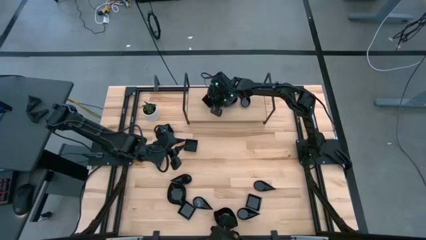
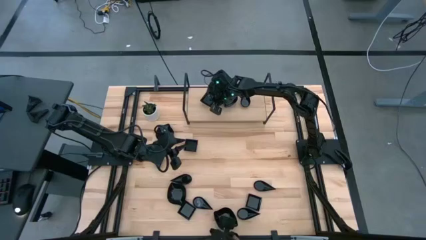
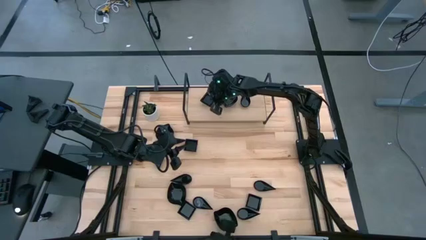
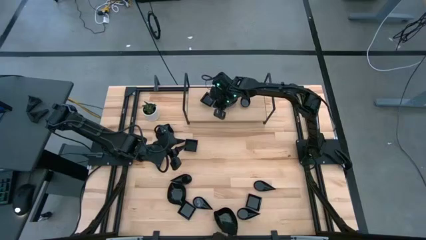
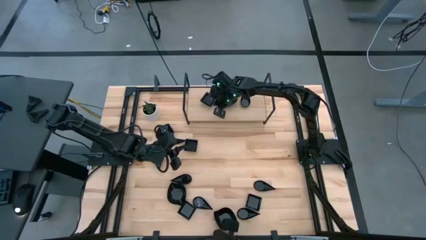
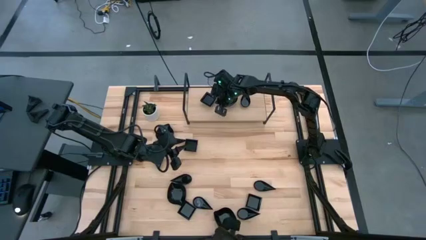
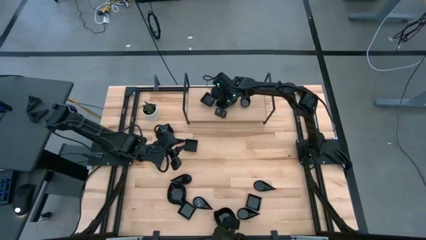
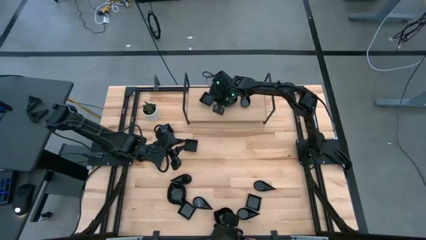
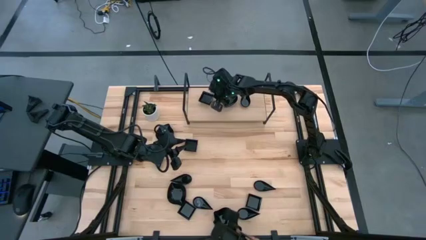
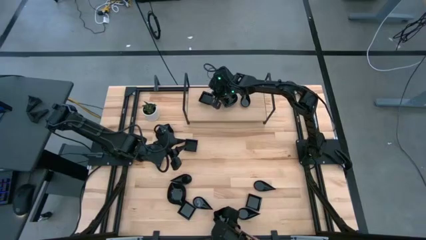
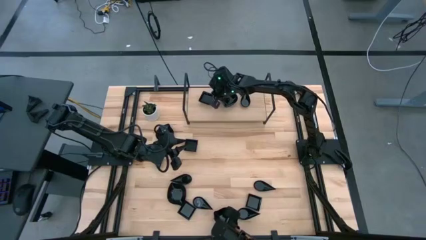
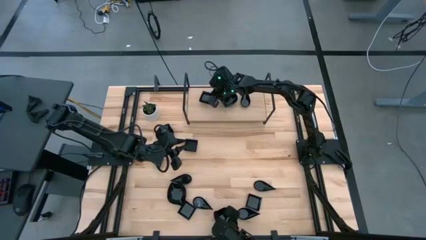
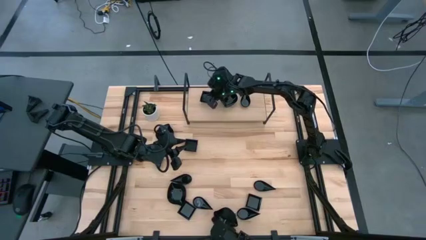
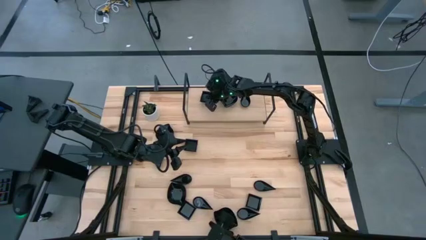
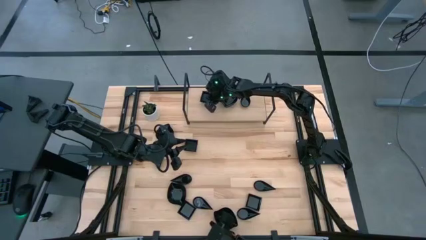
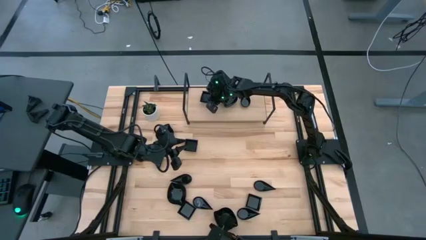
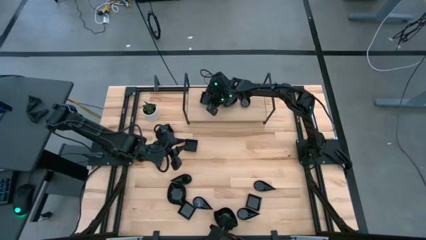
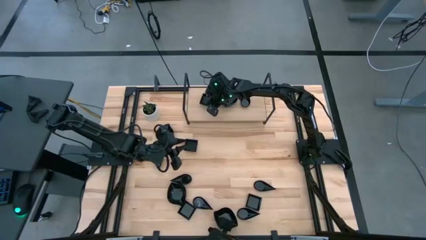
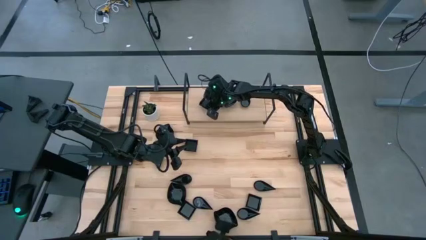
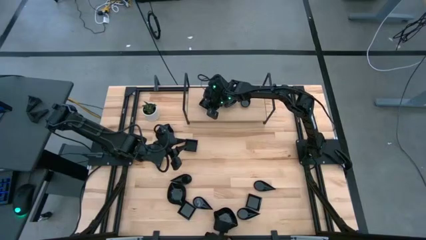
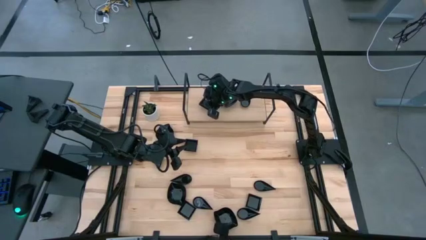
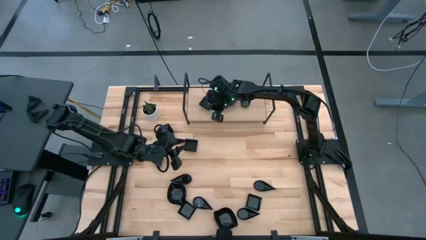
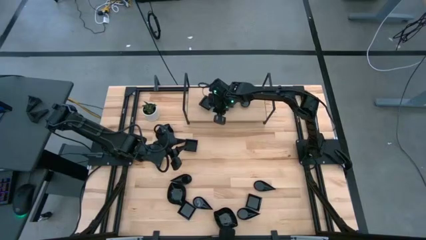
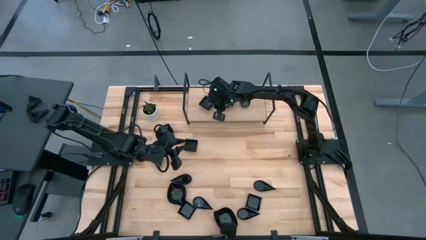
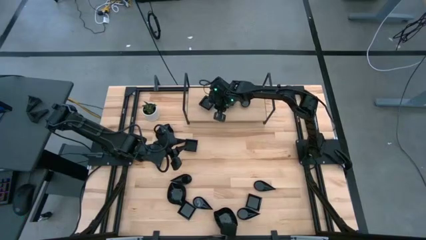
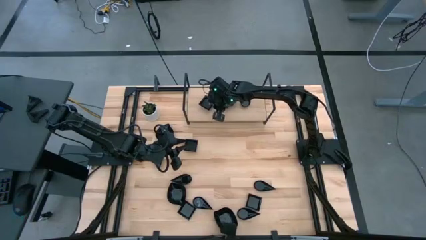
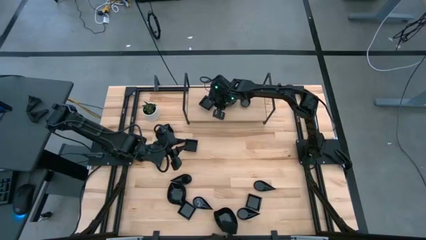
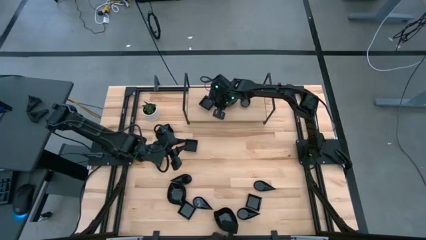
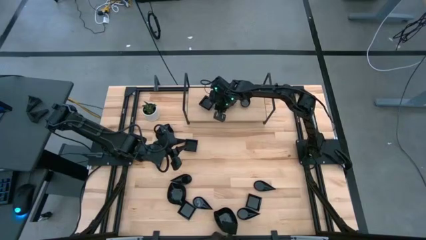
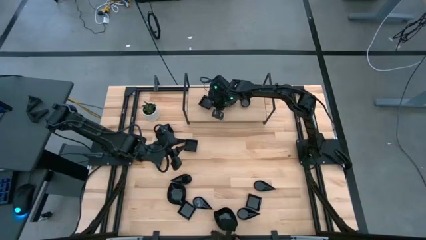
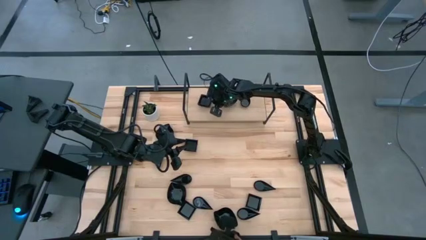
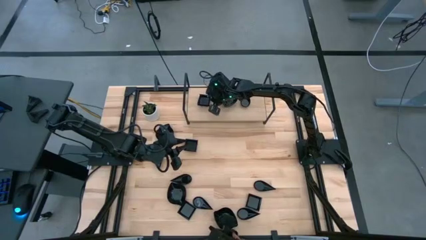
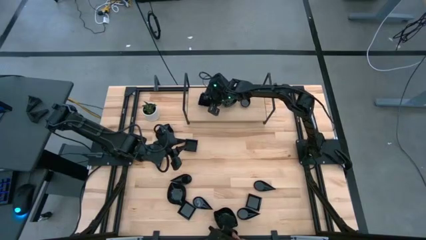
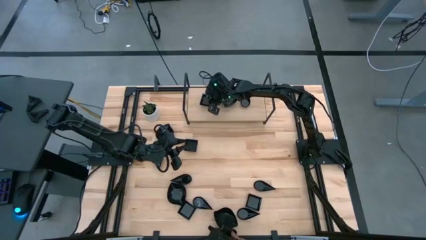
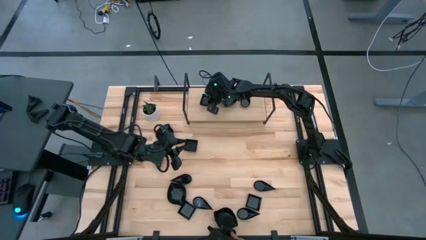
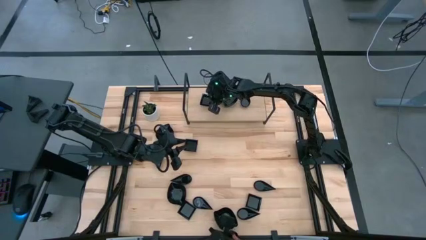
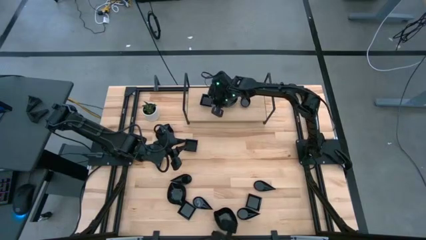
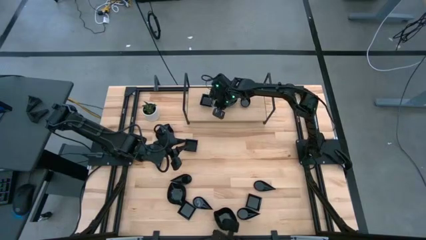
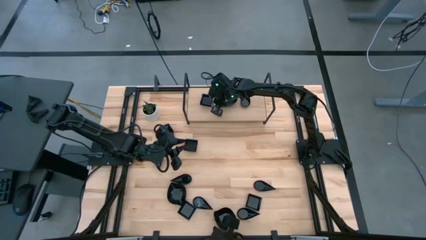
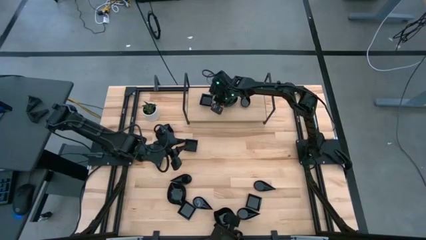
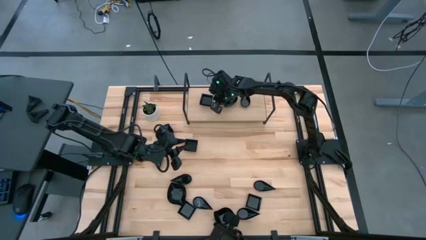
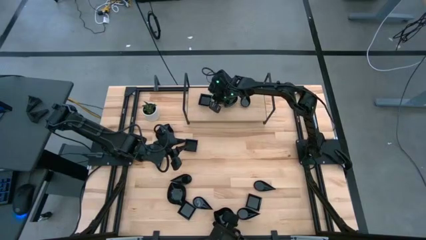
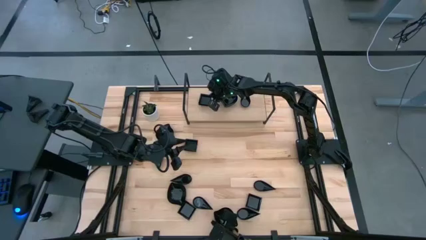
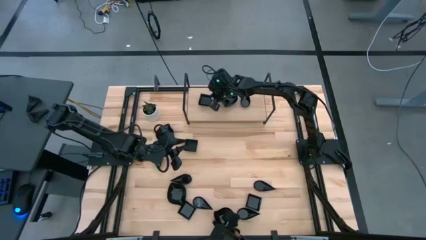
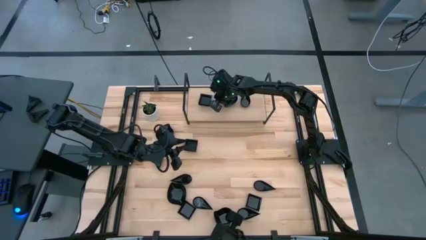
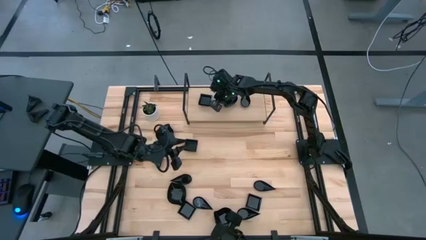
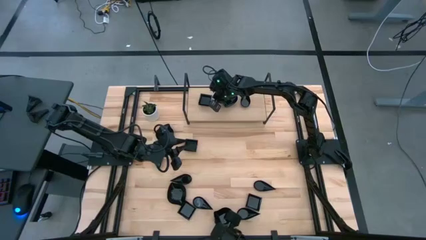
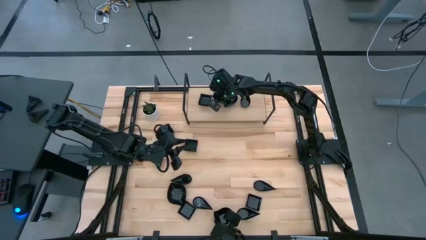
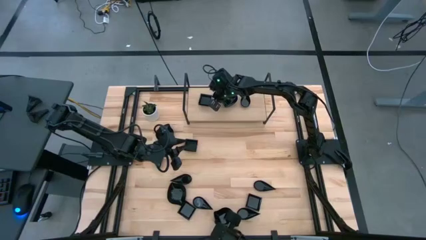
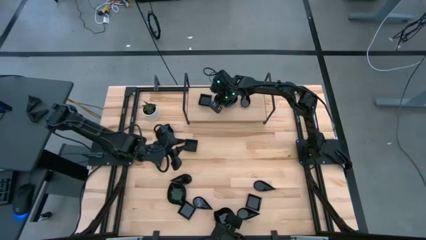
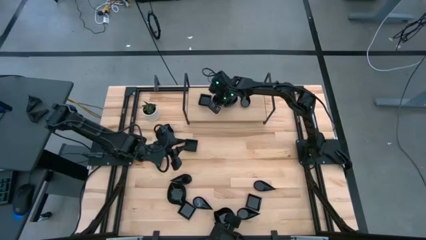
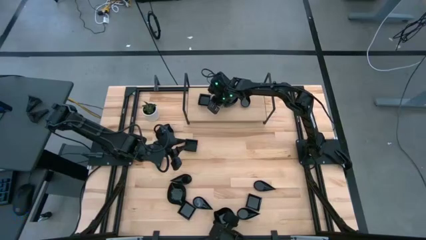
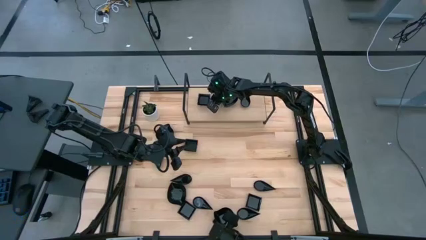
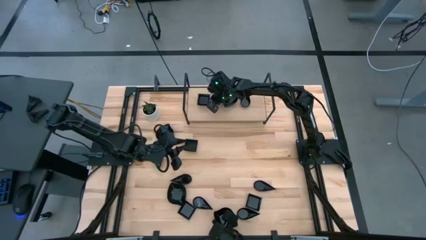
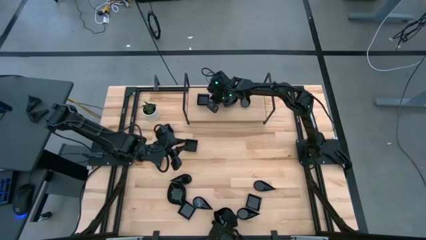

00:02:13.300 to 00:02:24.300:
Task: Pick & Place Mini shaped plates
Stack the black square bowl on top of the other black square bowl on the shelf

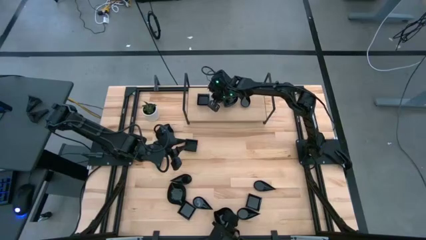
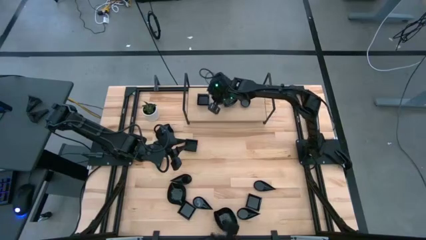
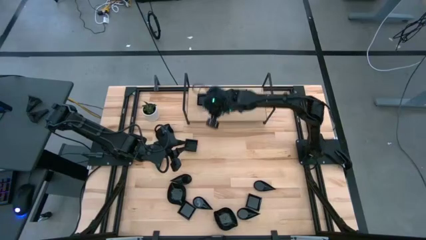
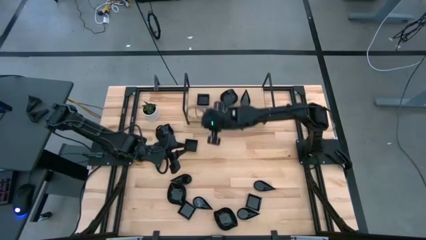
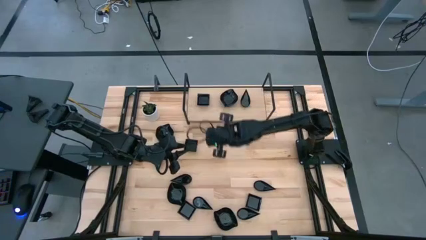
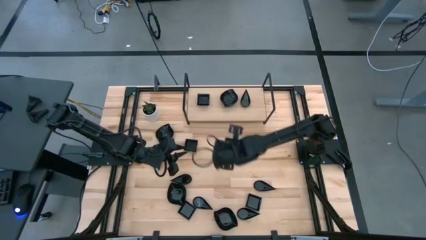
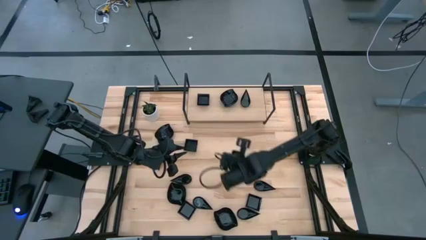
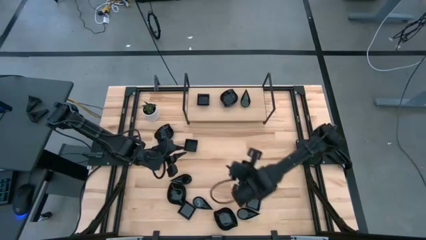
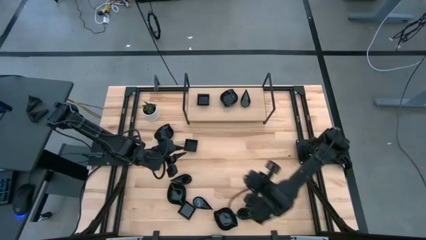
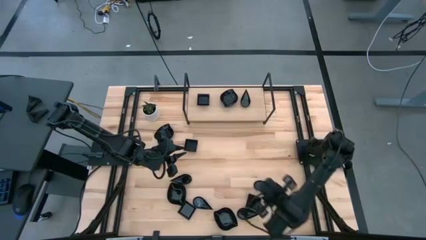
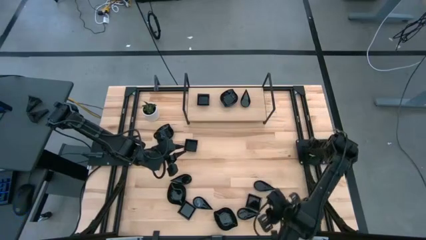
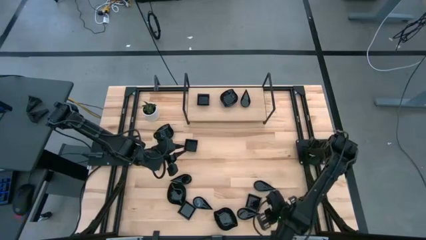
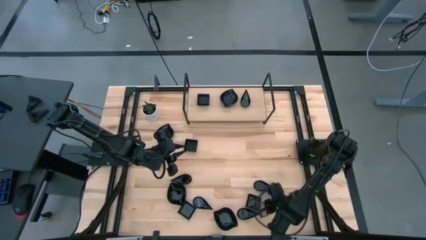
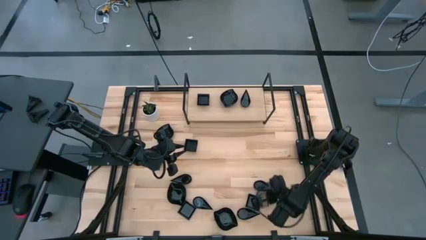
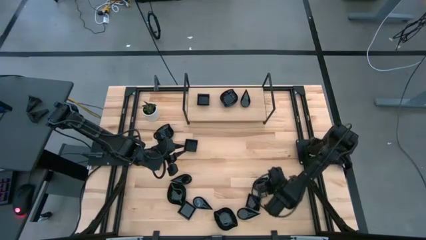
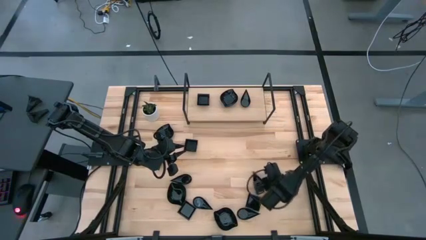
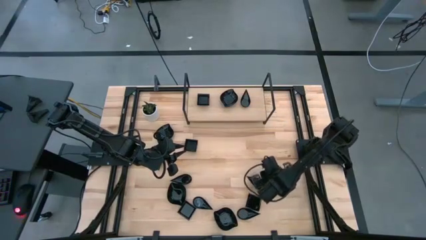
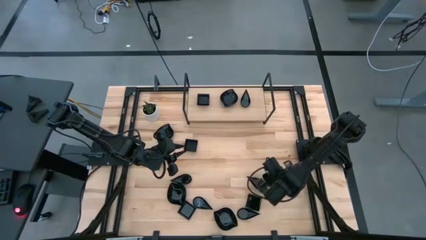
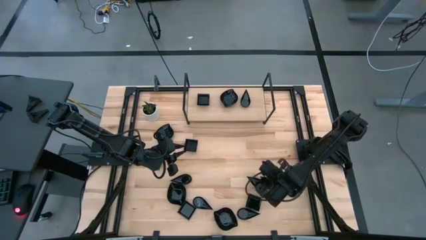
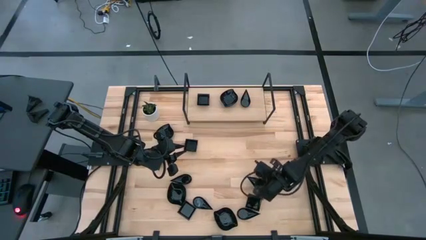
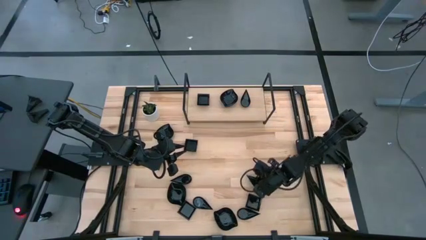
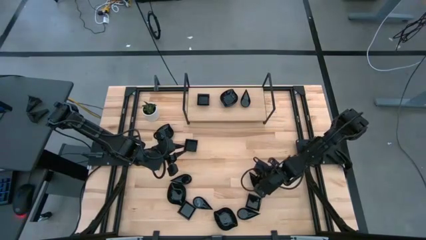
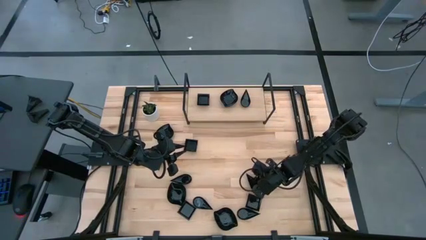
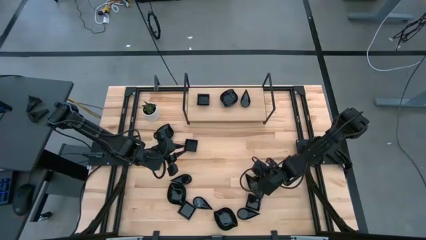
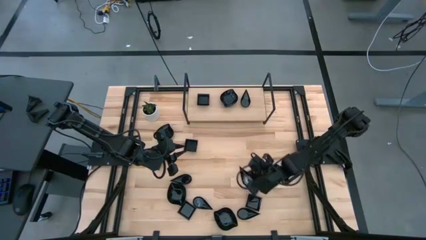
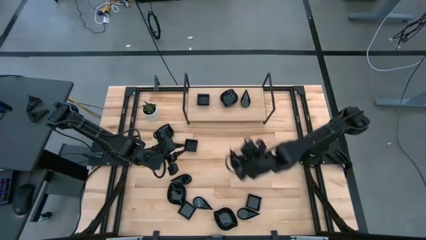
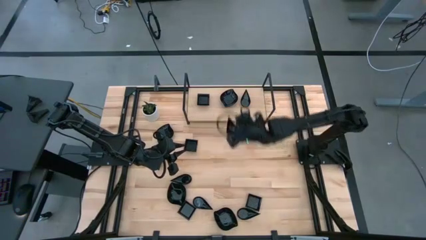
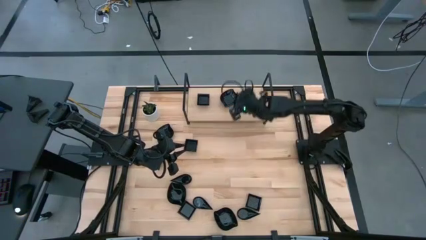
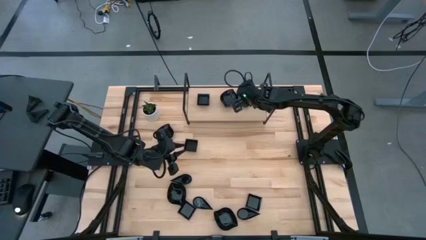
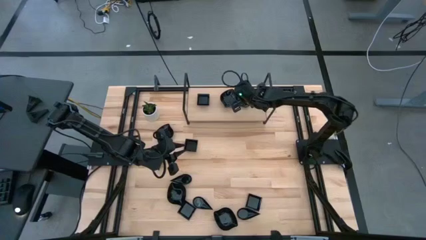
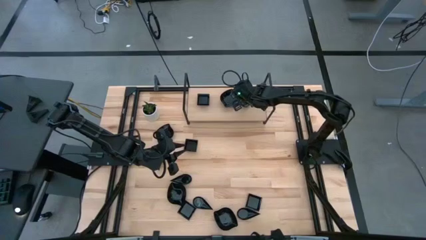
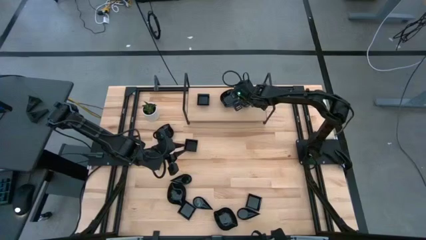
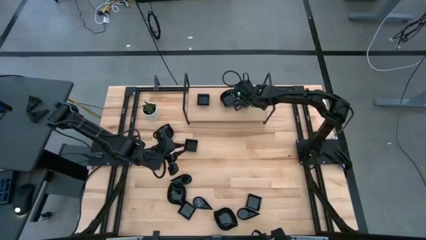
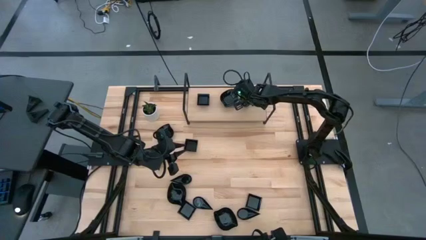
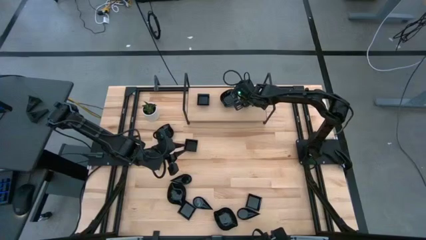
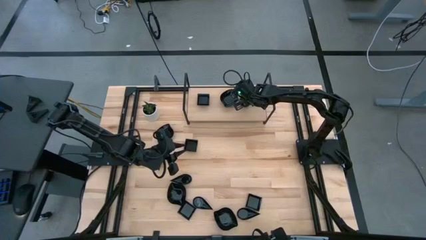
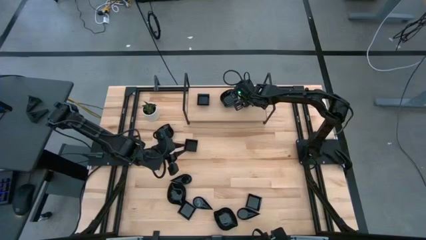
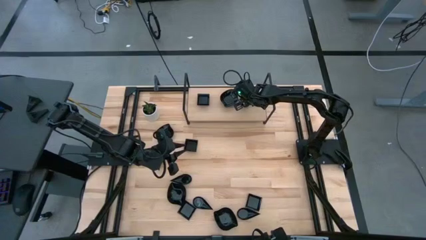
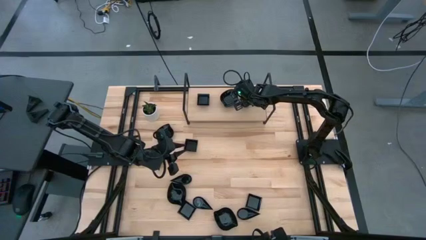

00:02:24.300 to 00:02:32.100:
Stack the black teardrop shaped bowl on top of the other black teardrop shaped bowl on the shelf
